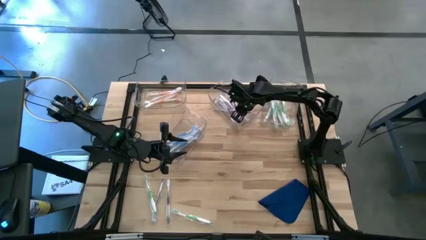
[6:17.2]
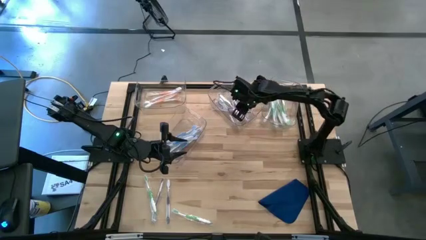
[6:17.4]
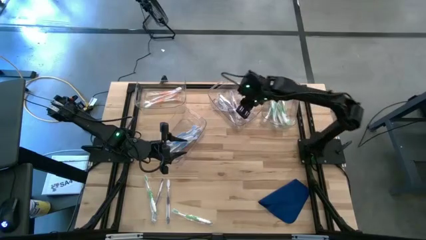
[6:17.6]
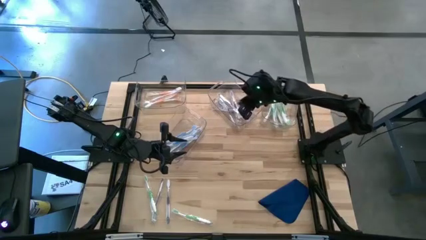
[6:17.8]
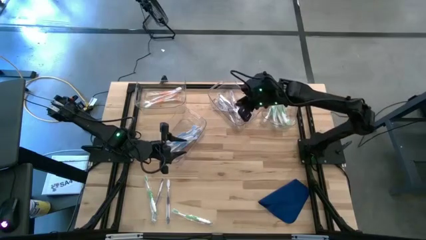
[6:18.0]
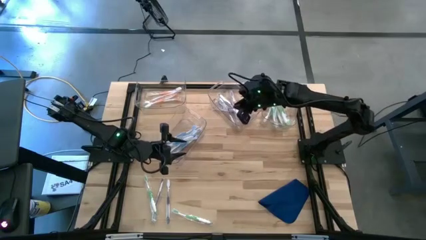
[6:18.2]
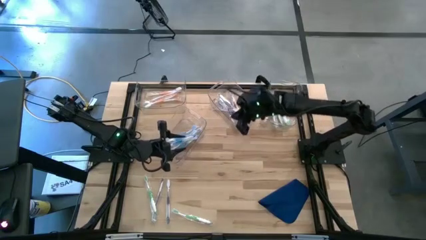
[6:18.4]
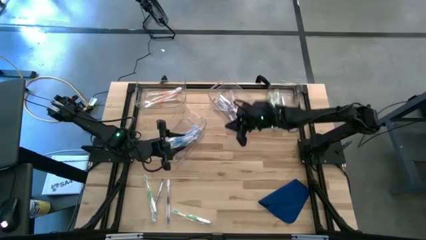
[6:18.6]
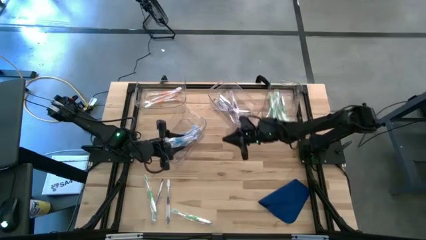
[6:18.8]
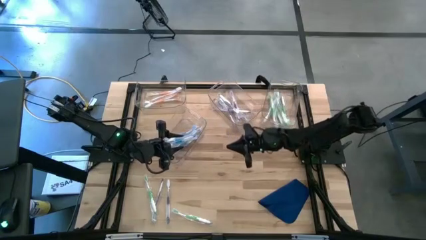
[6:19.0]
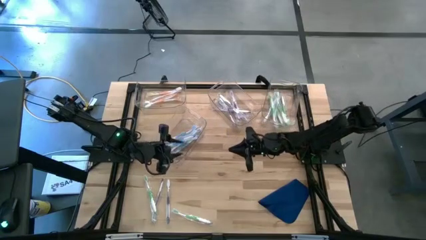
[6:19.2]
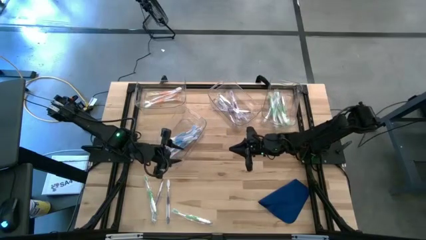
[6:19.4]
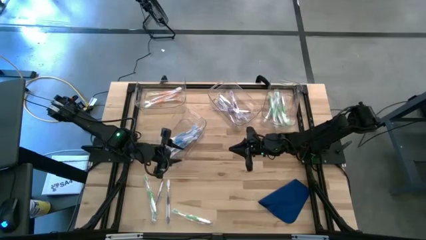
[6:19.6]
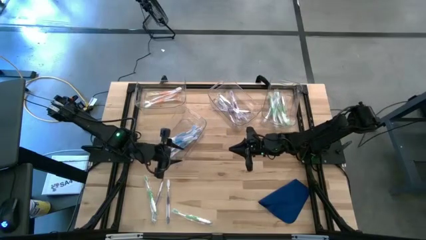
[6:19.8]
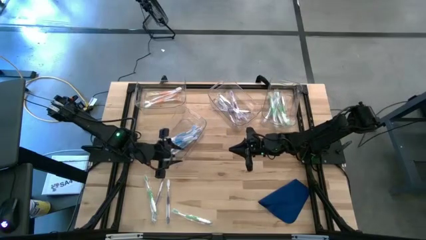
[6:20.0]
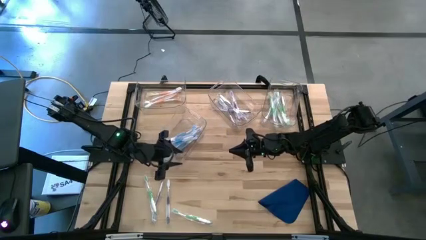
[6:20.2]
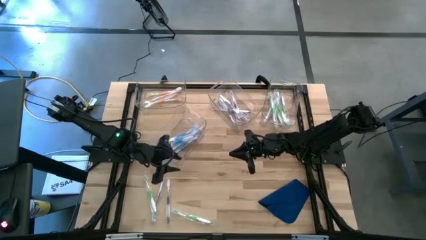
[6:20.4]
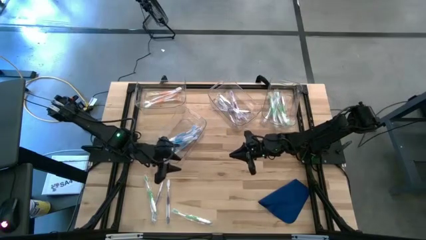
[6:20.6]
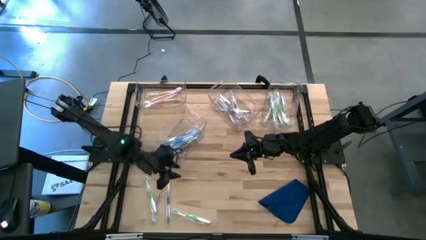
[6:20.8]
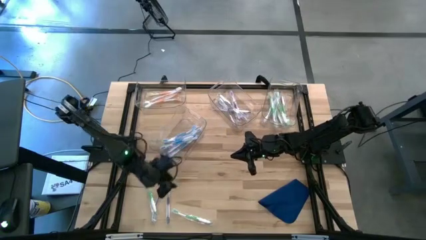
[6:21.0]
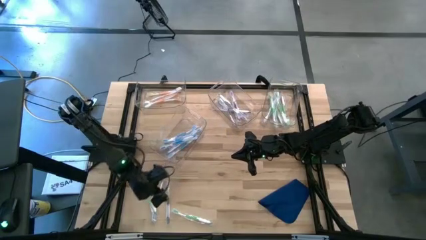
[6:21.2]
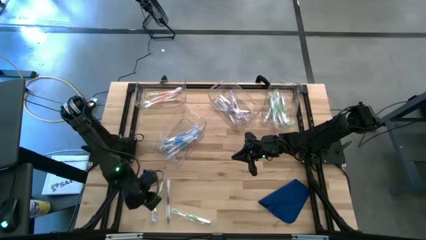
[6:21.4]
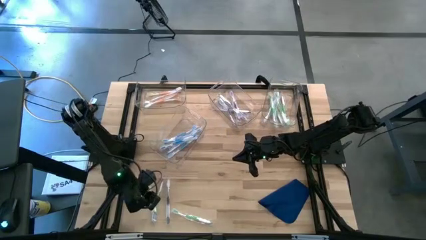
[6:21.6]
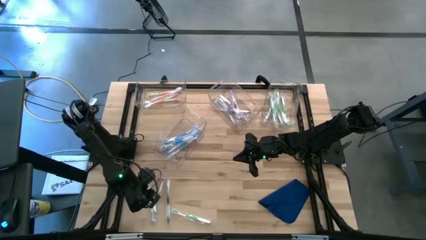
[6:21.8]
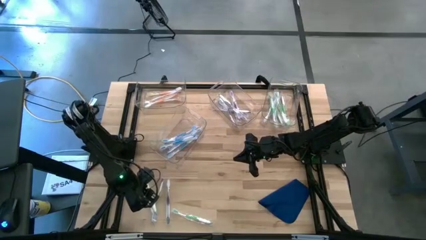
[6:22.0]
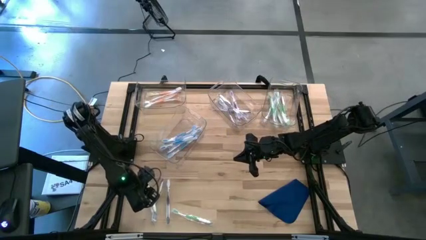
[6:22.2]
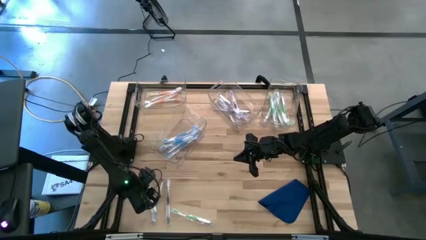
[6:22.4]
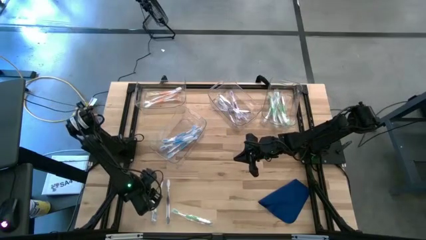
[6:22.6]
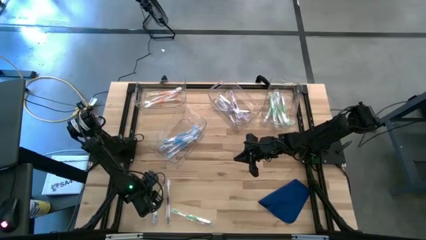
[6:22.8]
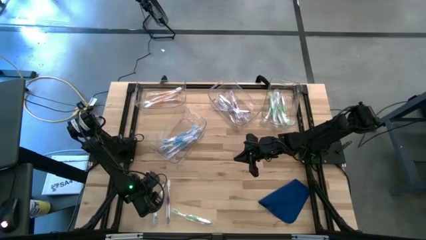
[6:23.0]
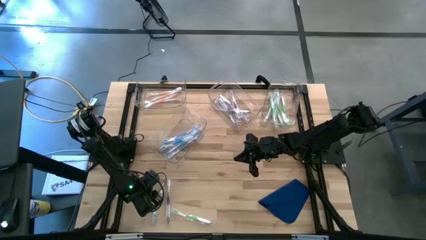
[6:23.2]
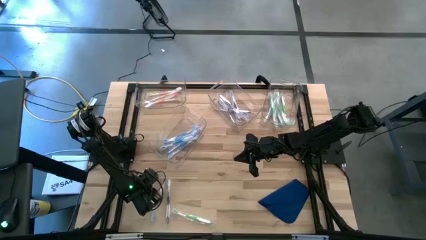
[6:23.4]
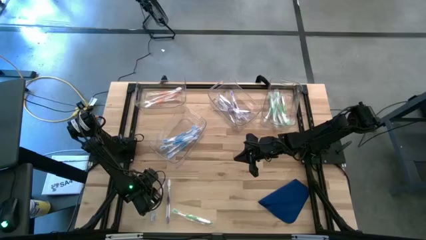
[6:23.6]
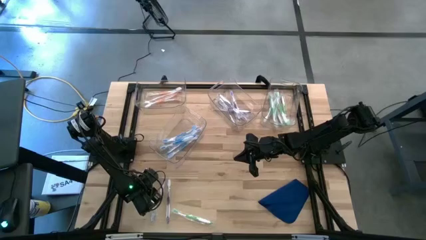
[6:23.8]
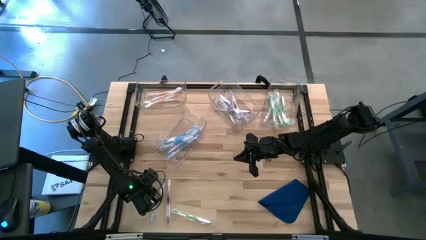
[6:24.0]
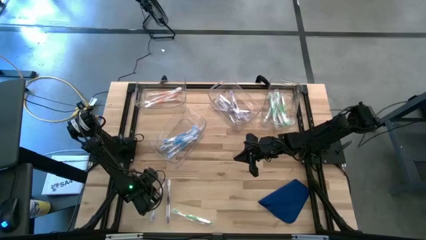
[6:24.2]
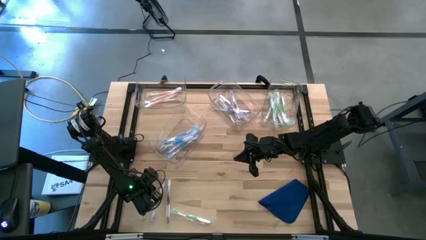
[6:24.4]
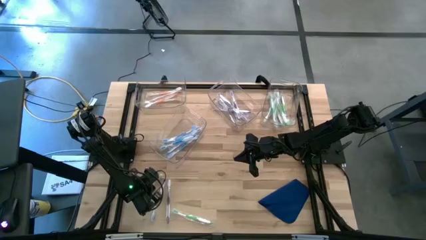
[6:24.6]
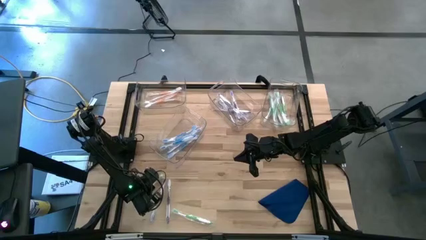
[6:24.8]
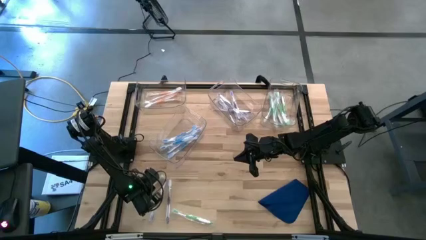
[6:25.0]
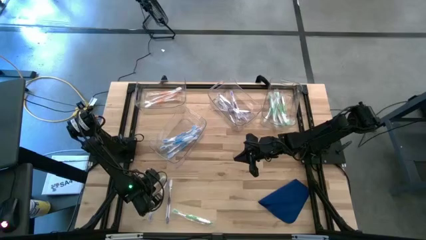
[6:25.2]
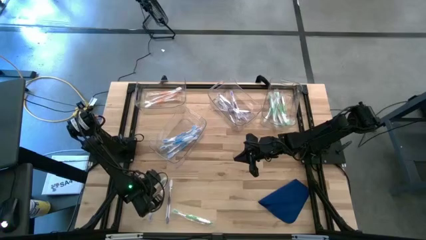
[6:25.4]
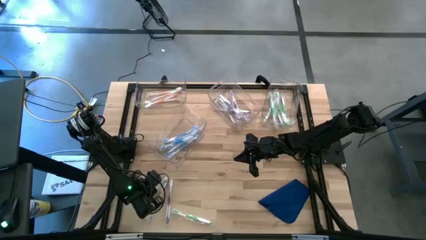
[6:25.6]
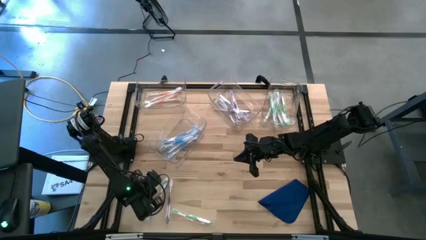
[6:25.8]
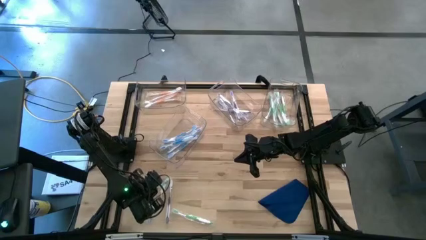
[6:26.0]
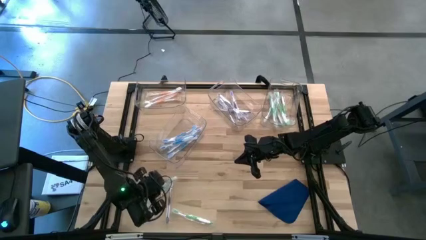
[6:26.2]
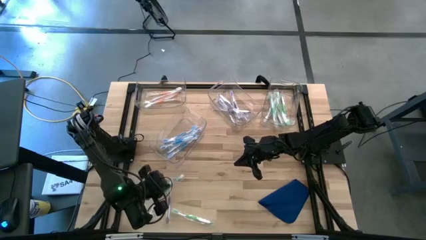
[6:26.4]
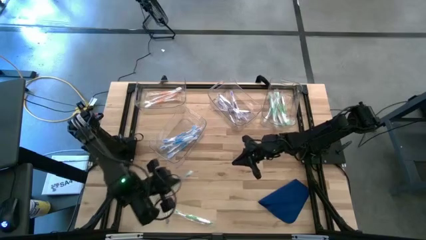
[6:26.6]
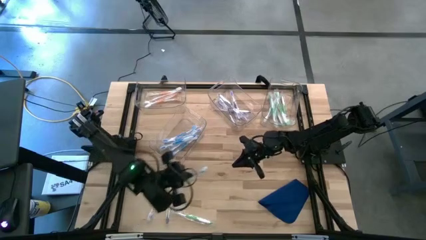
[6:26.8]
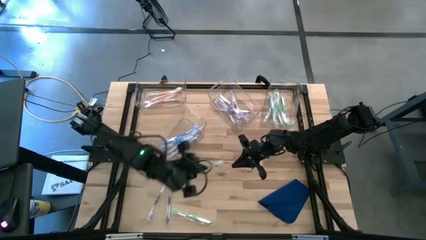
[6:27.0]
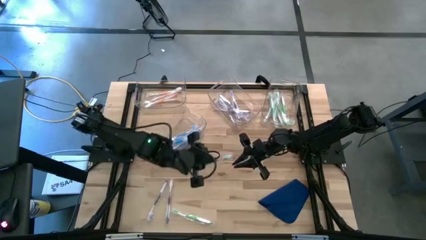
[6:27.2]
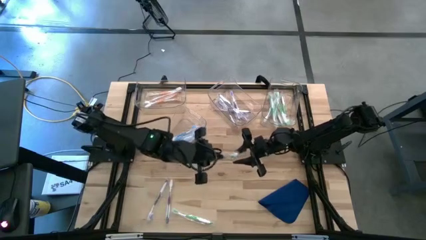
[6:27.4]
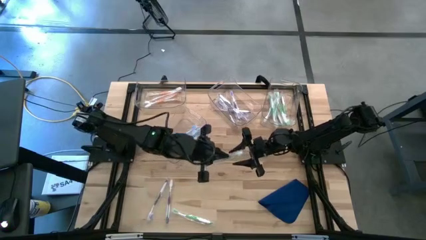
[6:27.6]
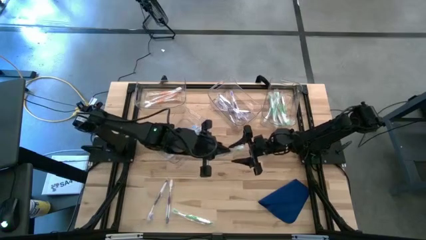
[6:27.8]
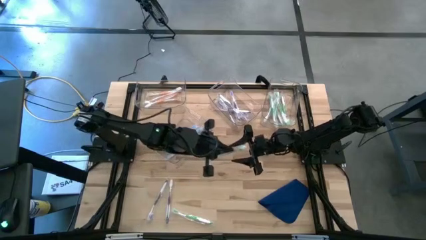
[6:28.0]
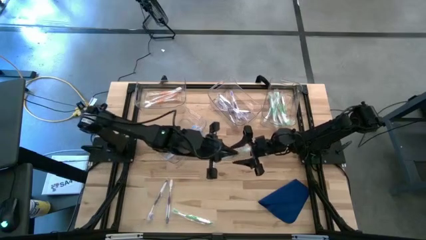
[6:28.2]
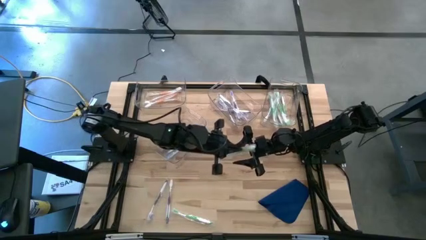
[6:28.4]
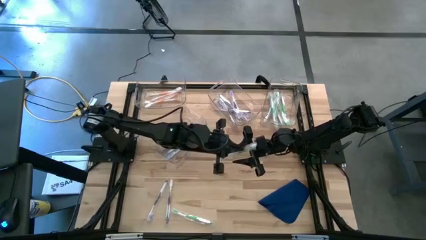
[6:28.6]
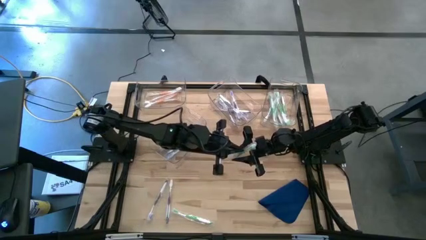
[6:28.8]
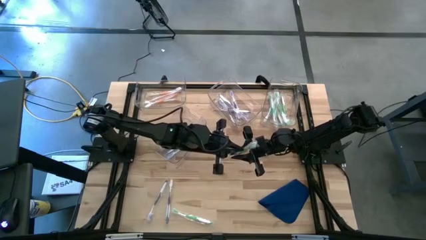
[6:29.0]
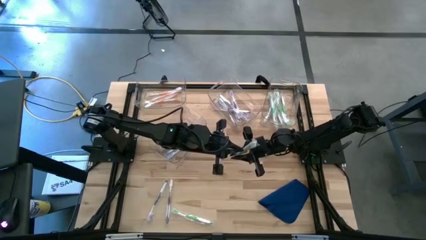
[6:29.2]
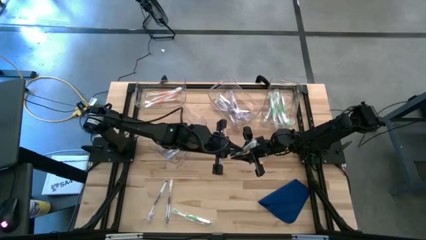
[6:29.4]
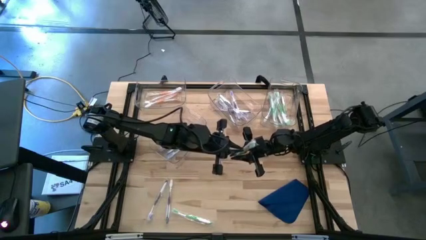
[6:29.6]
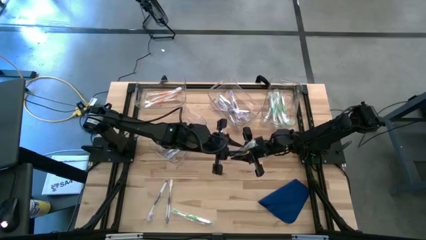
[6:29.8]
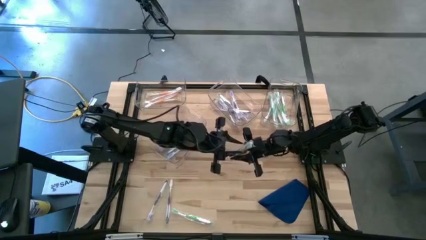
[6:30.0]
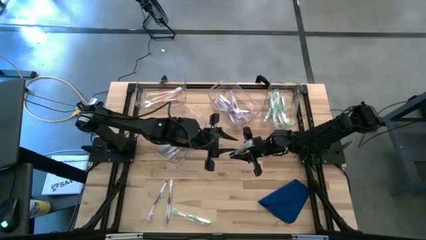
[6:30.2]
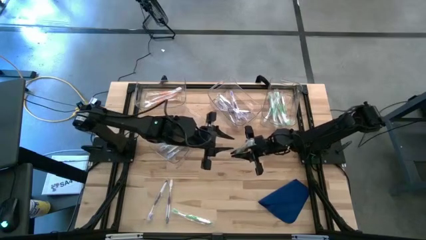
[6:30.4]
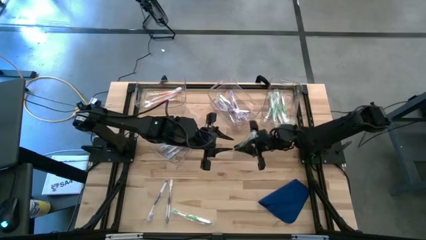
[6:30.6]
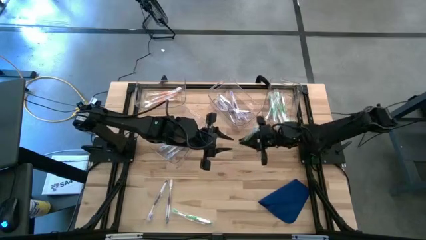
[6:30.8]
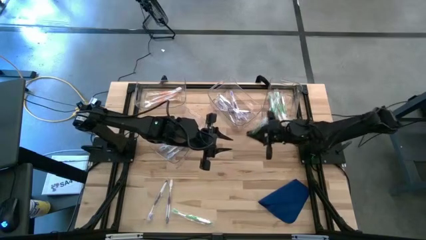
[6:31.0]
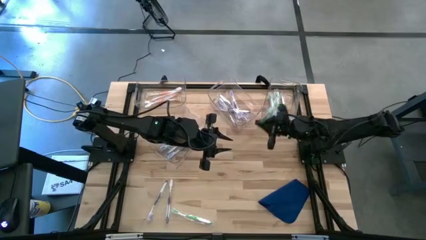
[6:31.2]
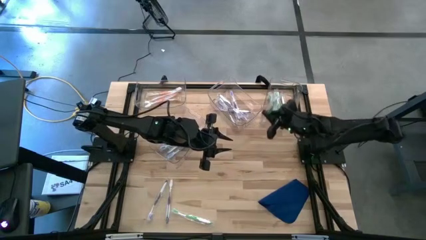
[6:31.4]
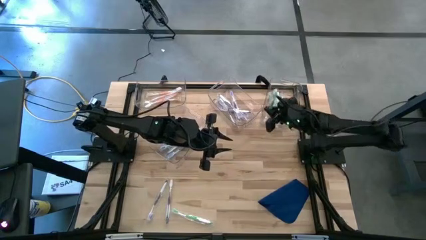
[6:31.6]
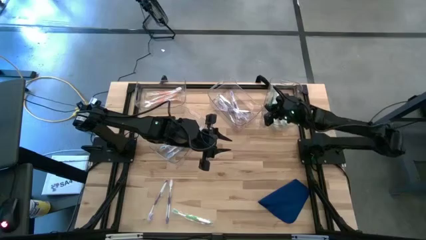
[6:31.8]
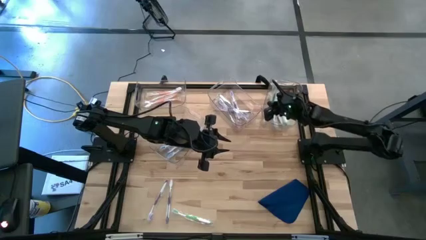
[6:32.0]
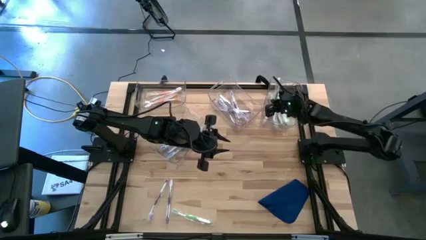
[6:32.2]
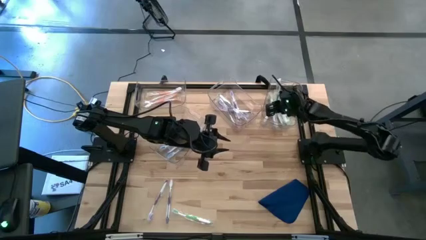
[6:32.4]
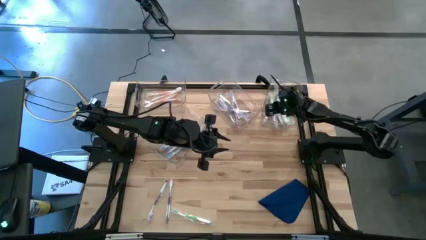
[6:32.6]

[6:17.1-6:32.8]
Task: Pick & Place Toothbrushes
Put the green toothbrush into the top right transparent bin
